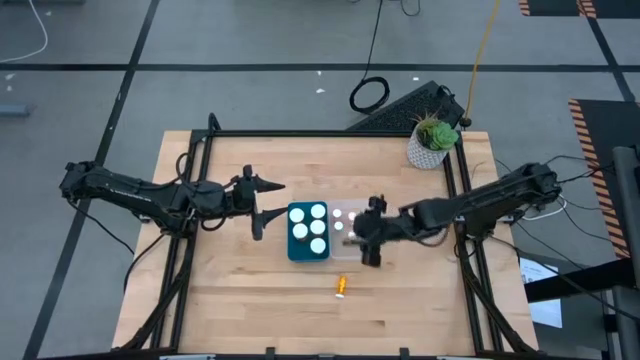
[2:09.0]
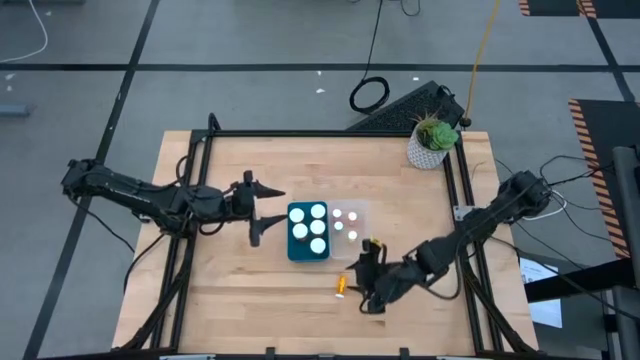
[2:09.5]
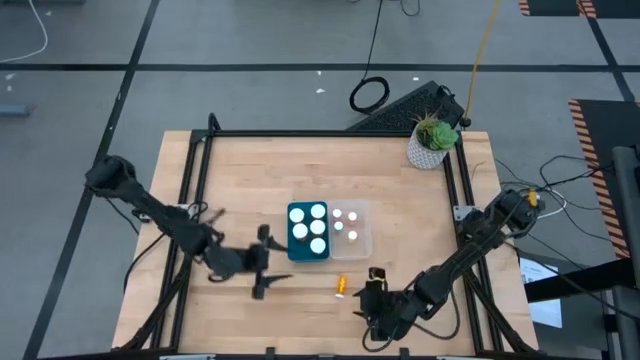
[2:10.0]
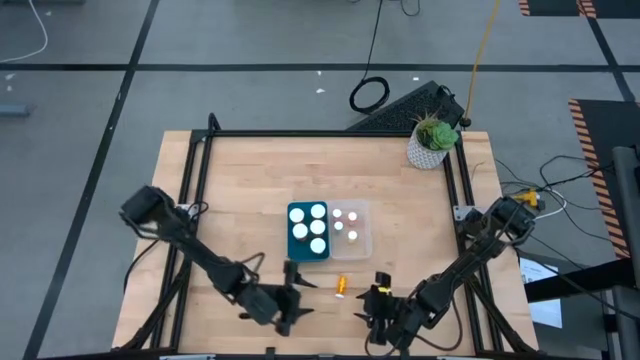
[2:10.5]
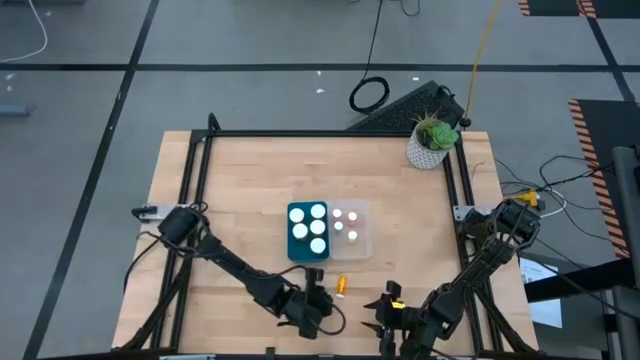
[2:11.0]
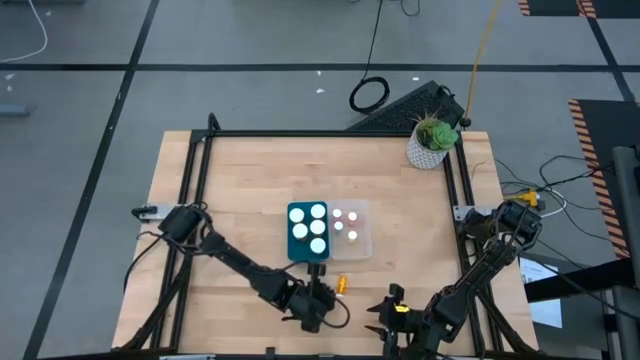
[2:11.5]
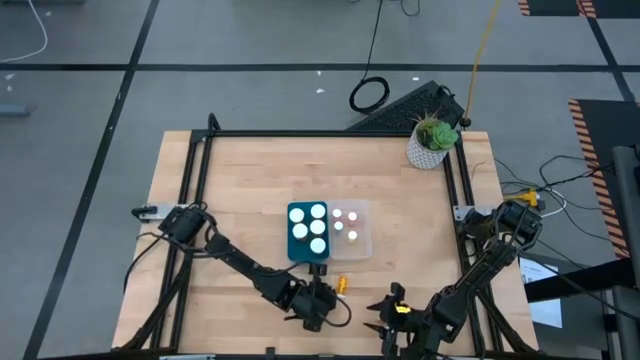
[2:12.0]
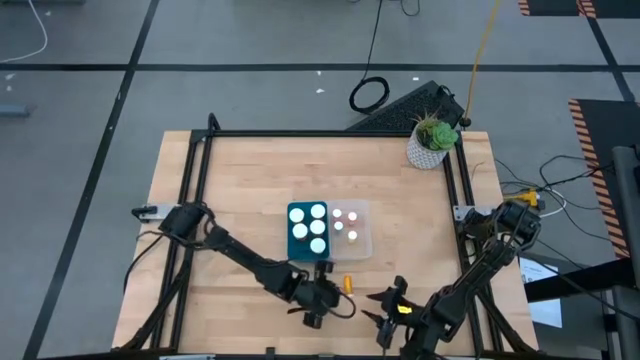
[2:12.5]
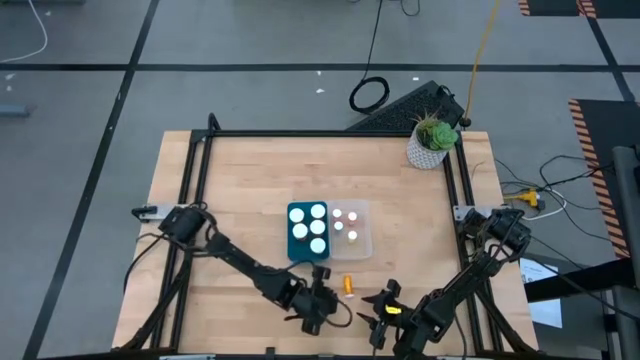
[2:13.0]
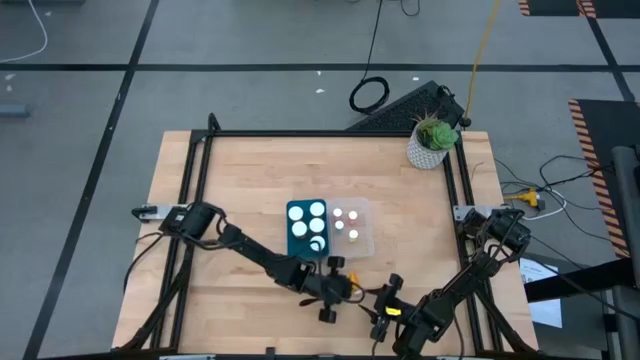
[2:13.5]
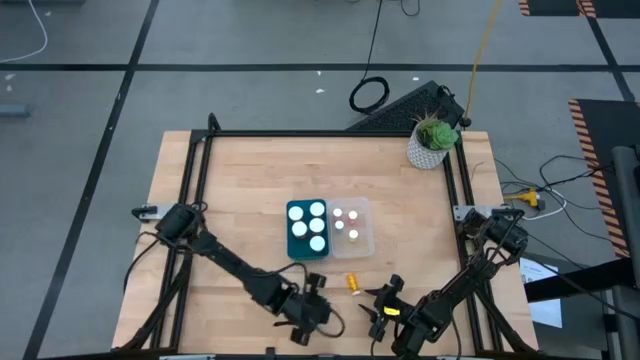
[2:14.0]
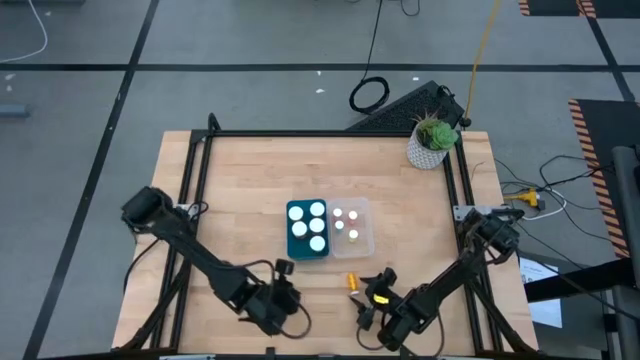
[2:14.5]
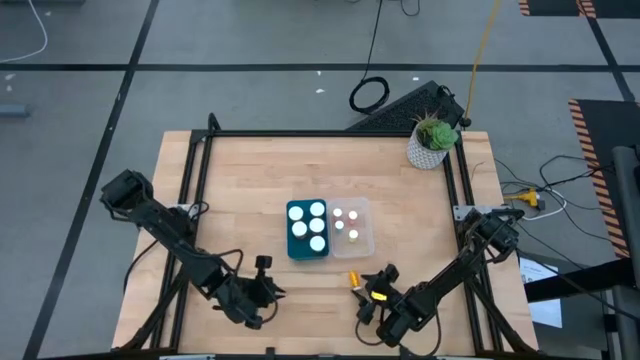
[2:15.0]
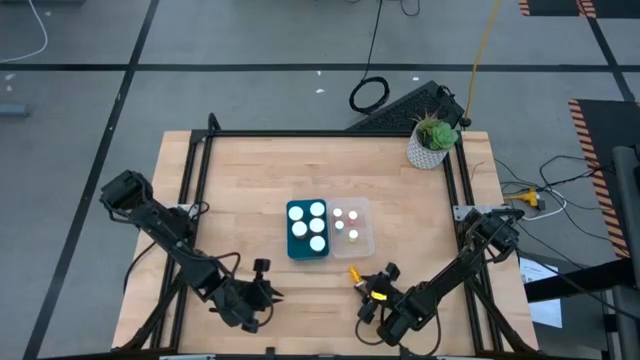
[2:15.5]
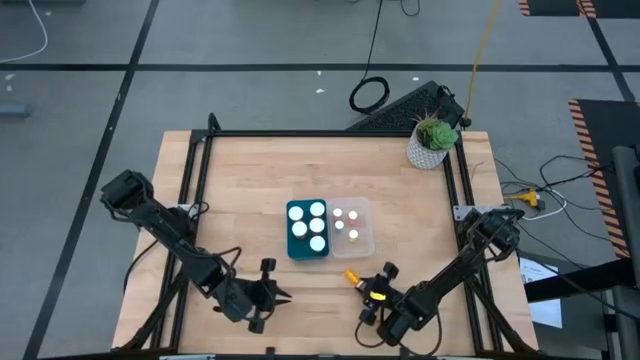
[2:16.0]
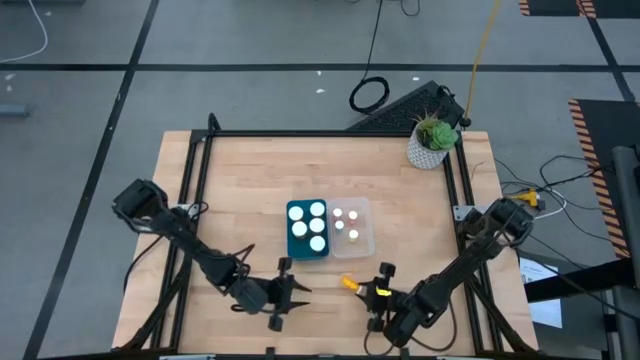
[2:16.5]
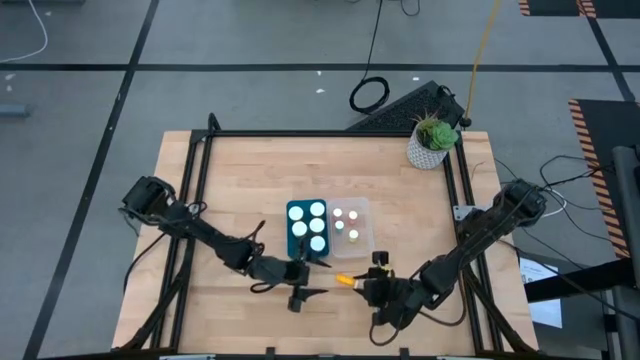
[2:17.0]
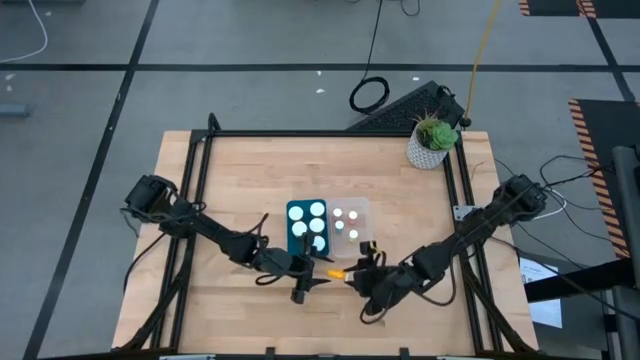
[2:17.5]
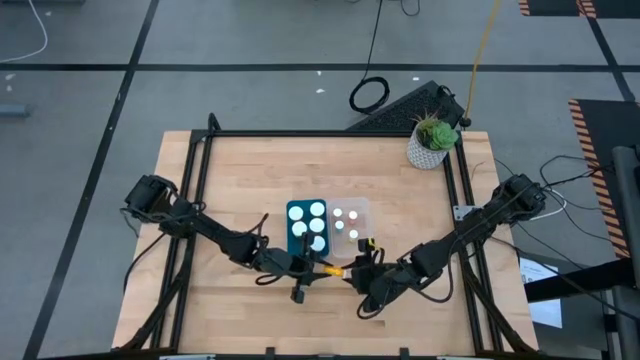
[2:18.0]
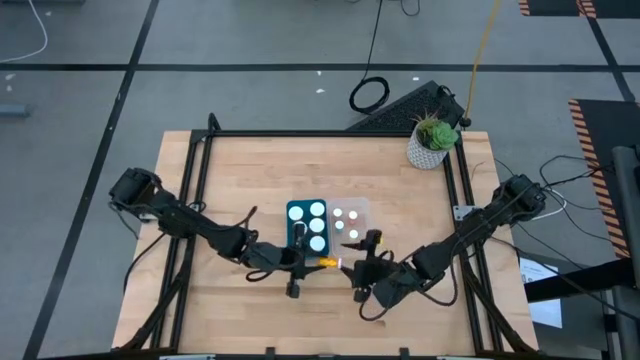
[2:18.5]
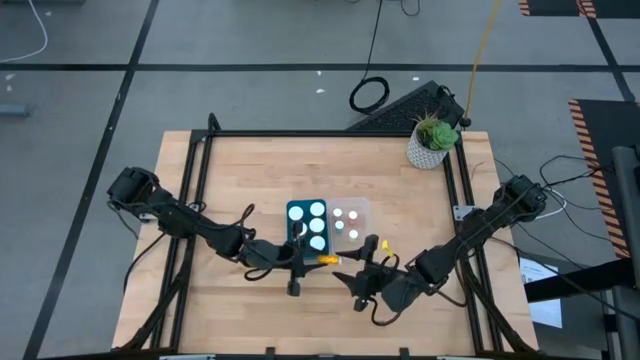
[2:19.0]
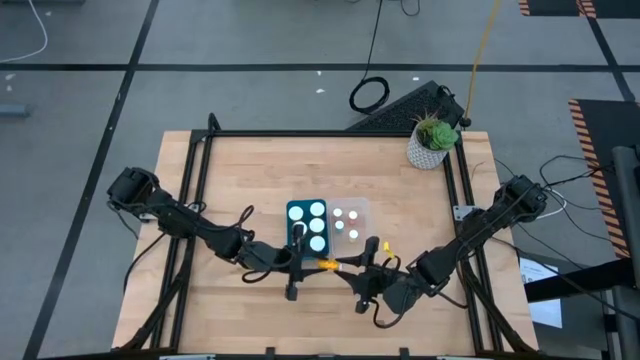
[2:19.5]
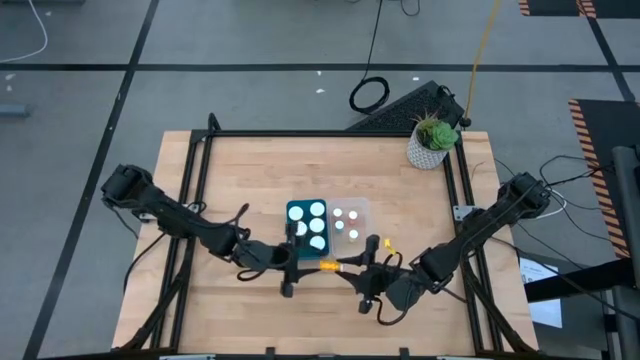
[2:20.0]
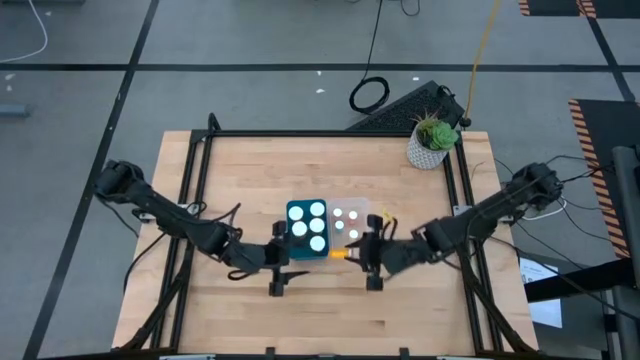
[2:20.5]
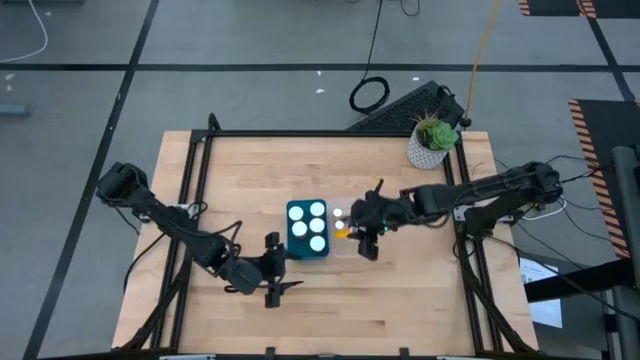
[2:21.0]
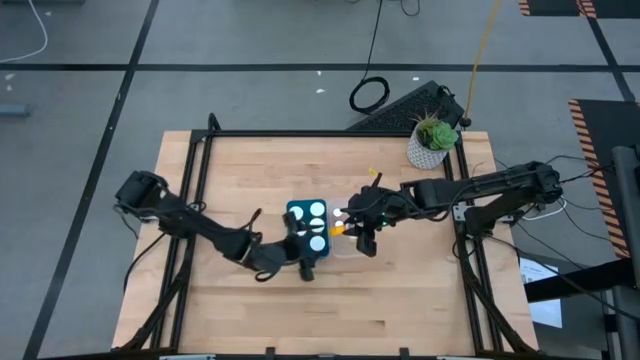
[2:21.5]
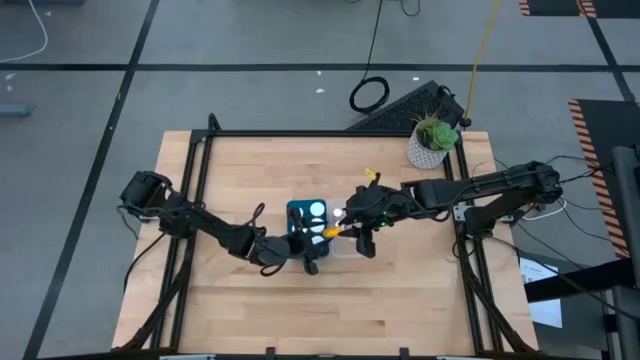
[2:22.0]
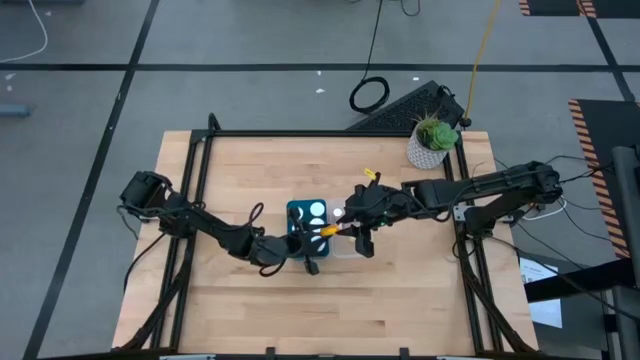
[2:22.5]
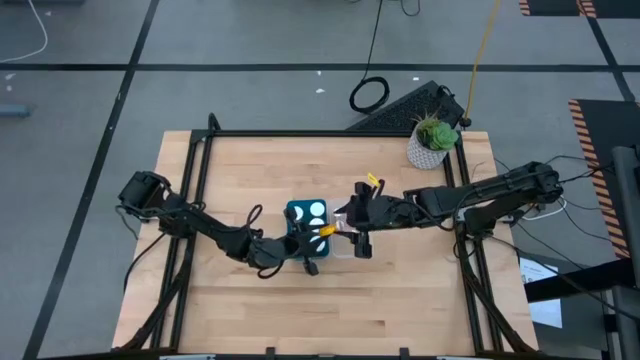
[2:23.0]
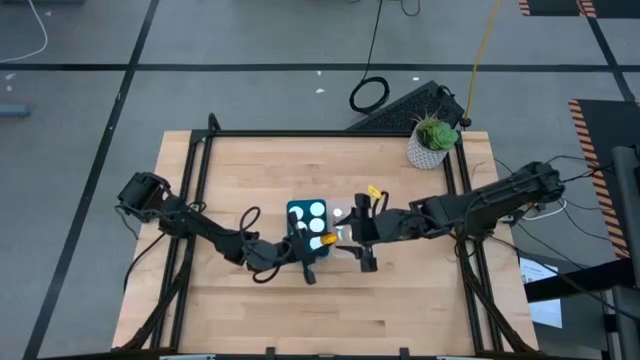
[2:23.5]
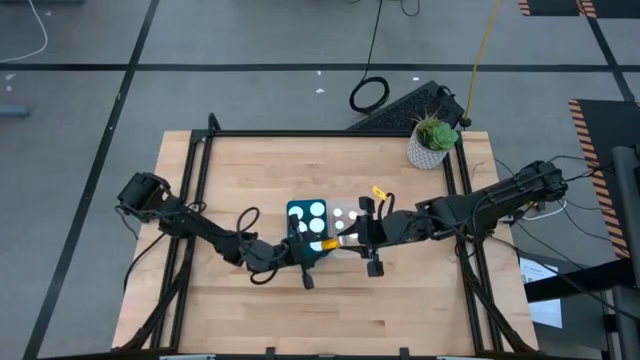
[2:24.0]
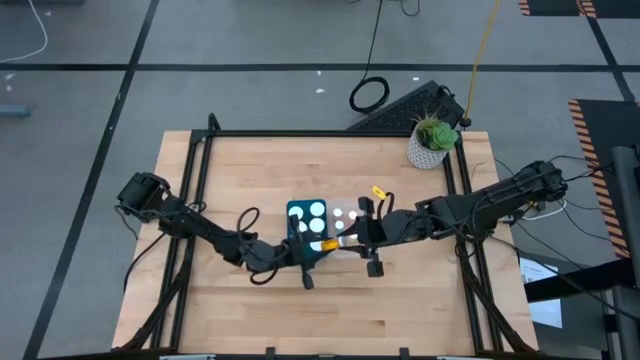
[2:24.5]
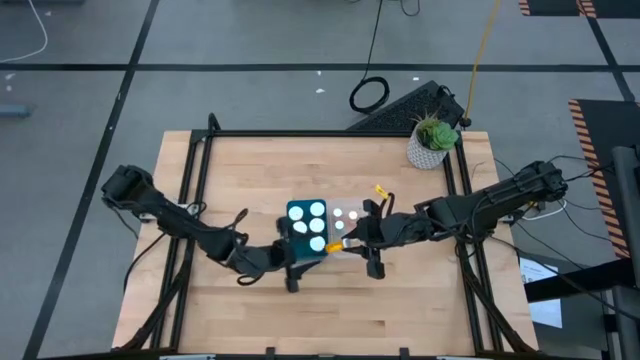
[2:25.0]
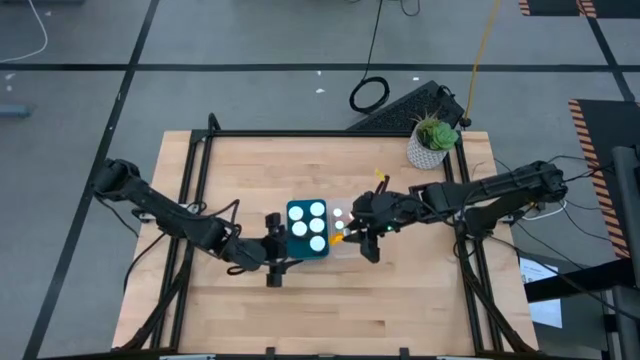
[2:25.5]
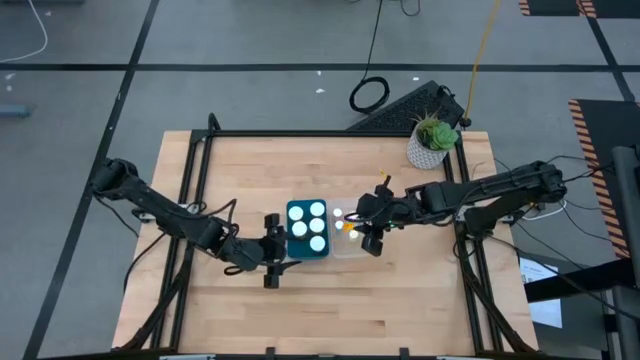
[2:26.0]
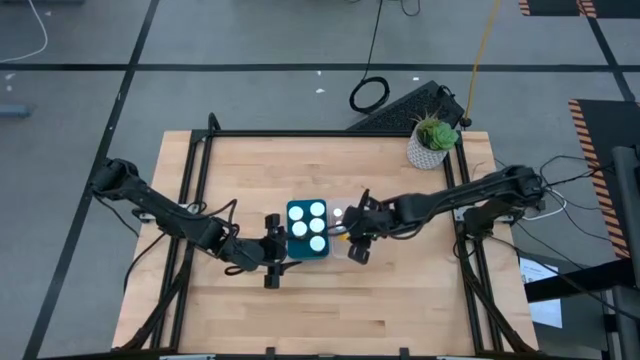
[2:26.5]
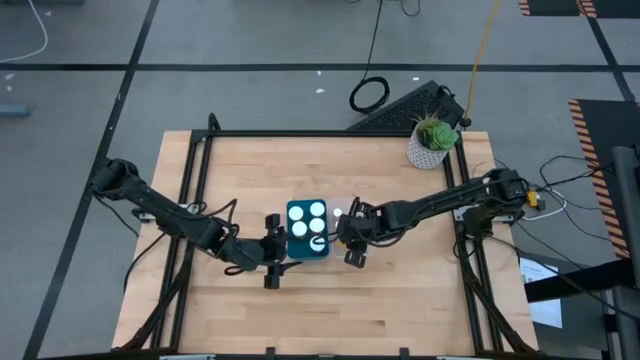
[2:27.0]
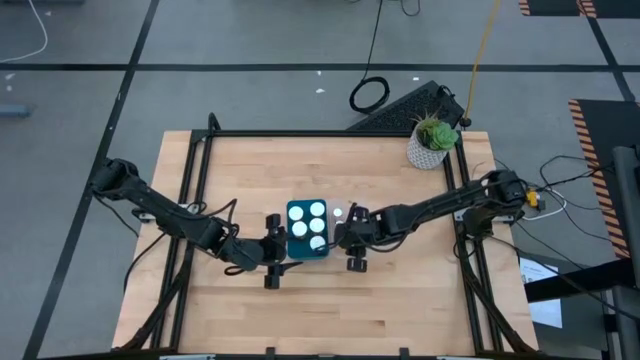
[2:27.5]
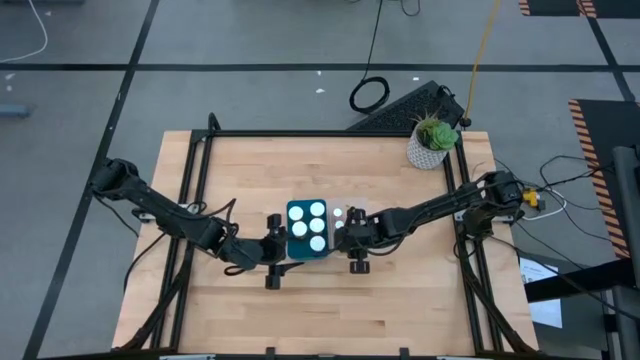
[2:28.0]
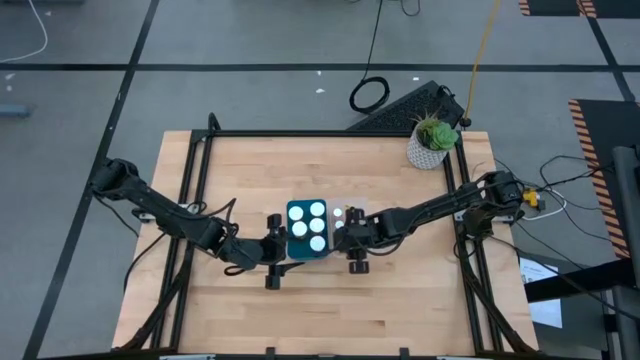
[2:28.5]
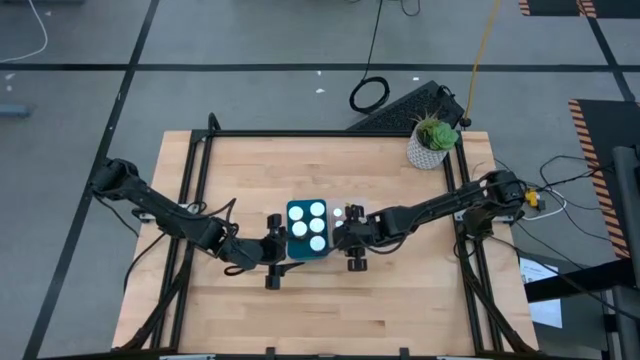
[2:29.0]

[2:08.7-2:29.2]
Task: Pick and place medicine bottles into bin by pill shape (circle, oval)
Put the small orange pill bottle into the transparent bin

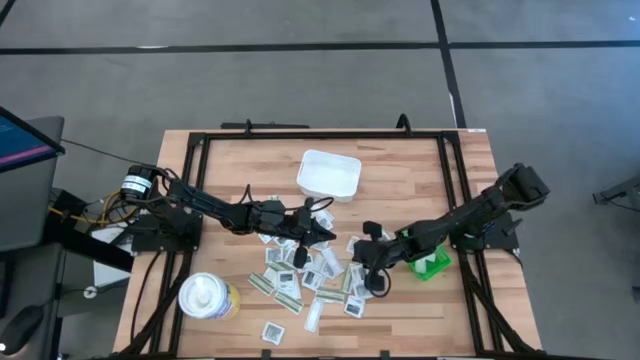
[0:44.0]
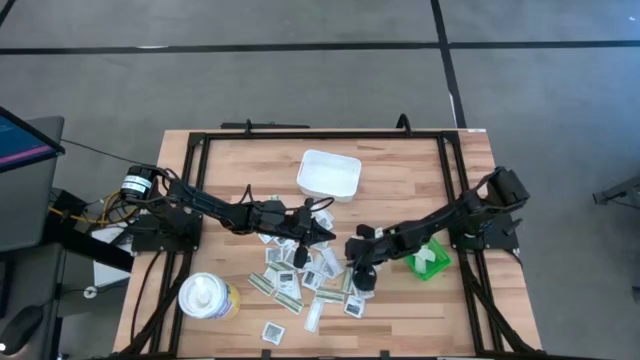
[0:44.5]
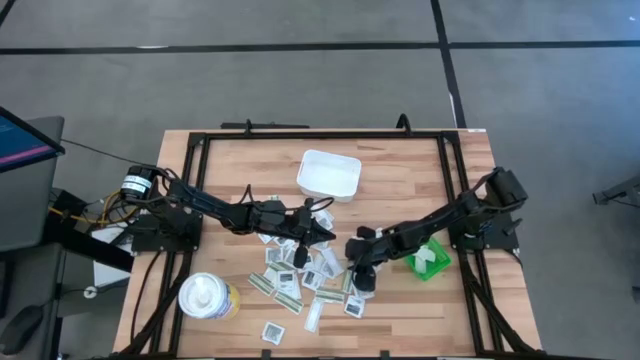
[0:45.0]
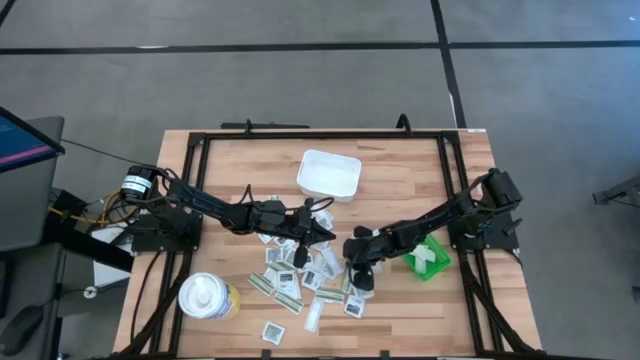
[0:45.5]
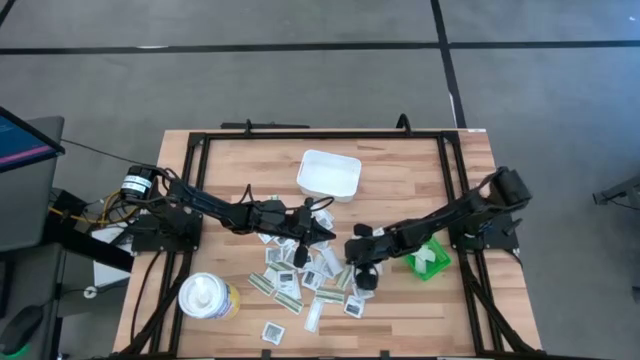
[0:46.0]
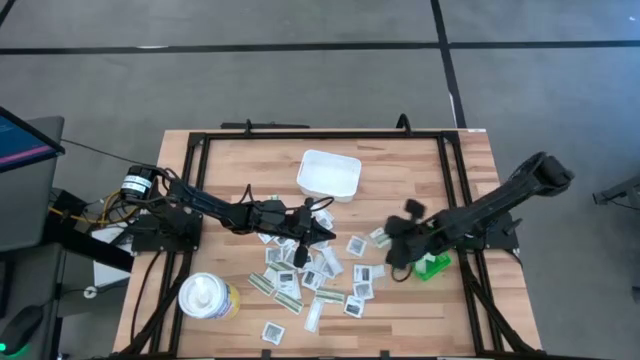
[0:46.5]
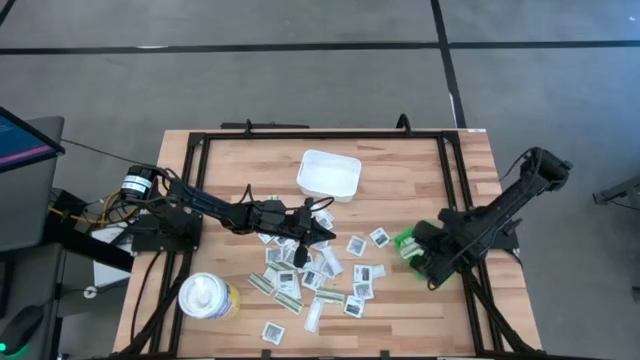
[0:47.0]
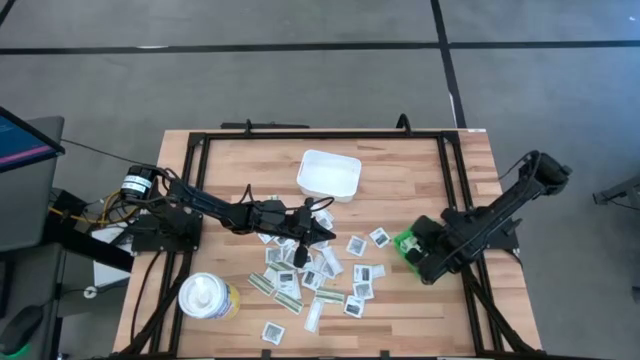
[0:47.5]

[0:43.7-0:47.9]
Task: Pick & Place First Aid Supplies
Put the bandage pack into the green bin
